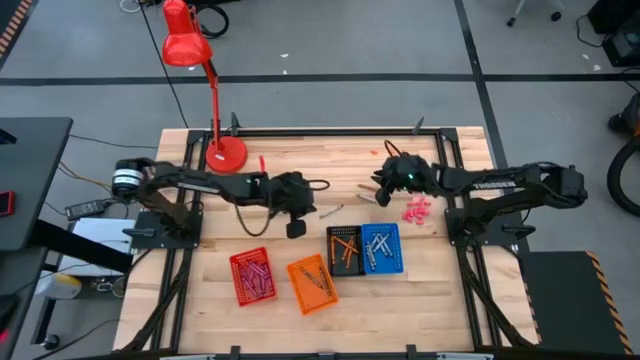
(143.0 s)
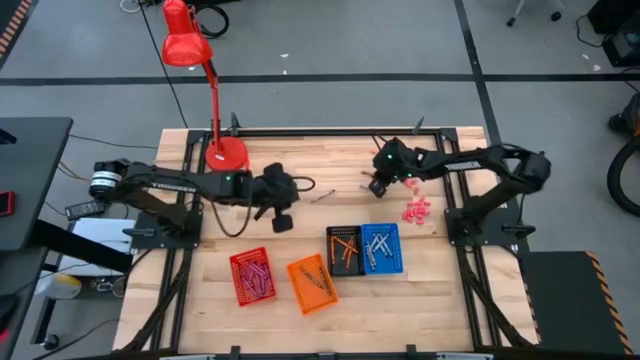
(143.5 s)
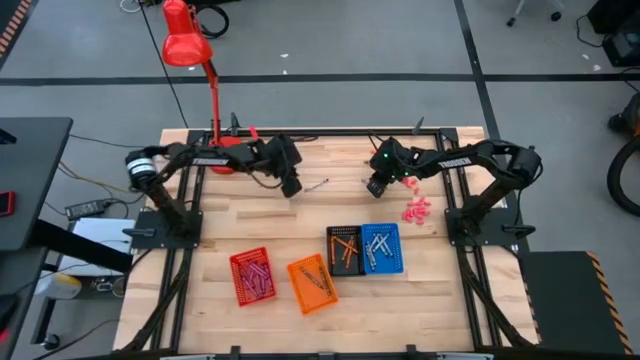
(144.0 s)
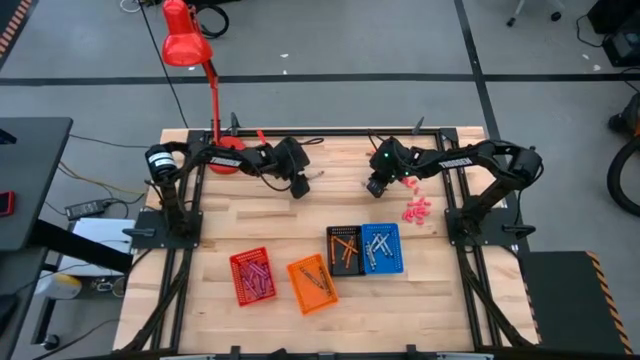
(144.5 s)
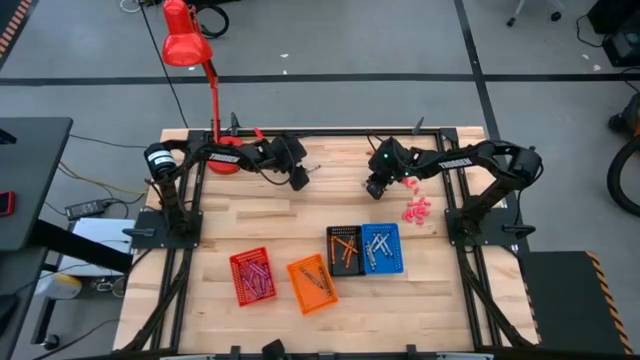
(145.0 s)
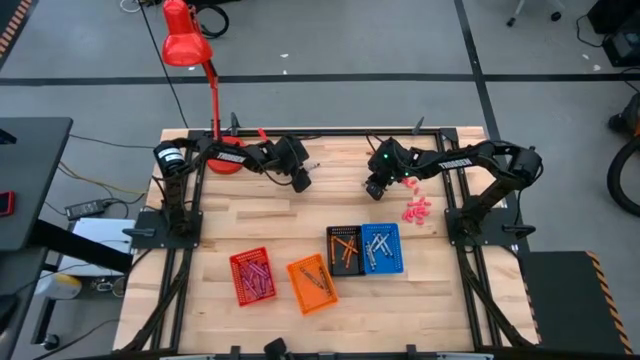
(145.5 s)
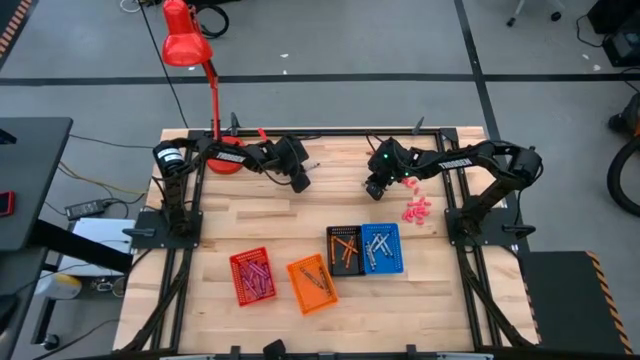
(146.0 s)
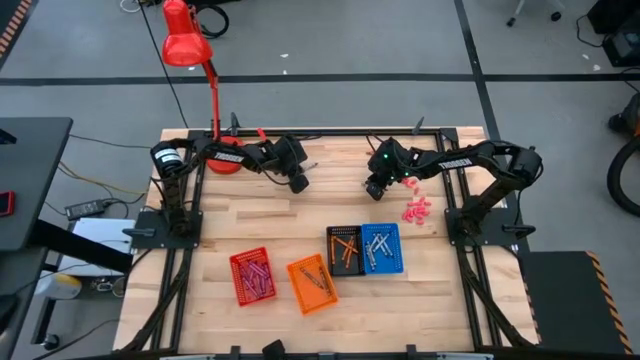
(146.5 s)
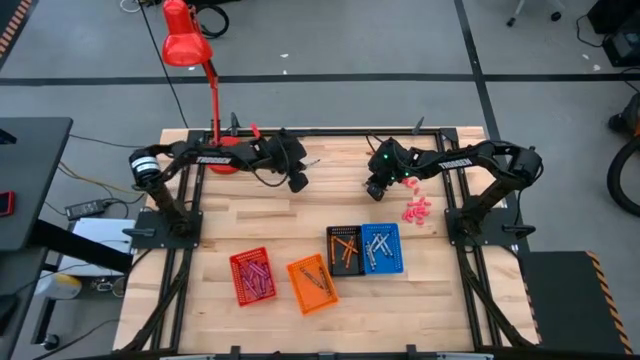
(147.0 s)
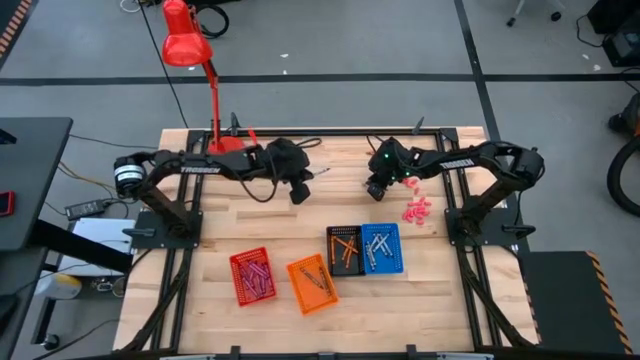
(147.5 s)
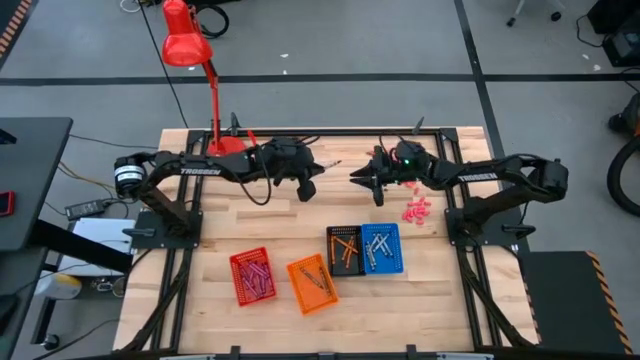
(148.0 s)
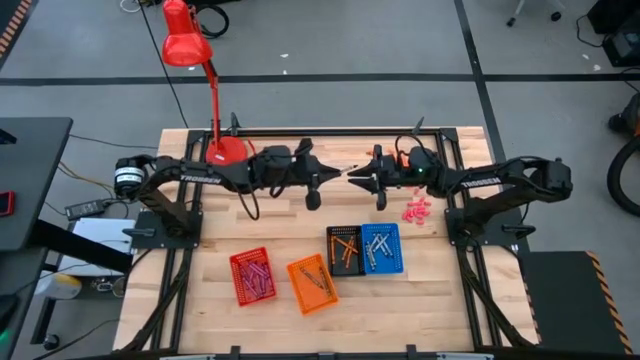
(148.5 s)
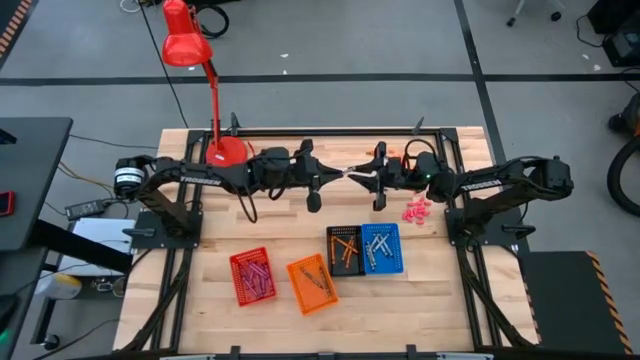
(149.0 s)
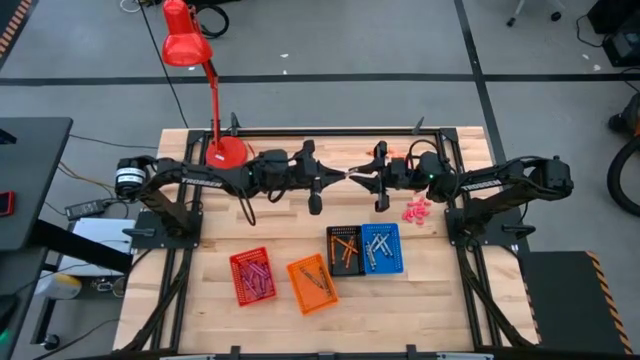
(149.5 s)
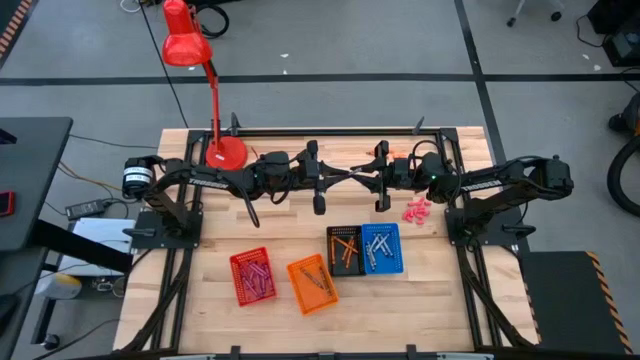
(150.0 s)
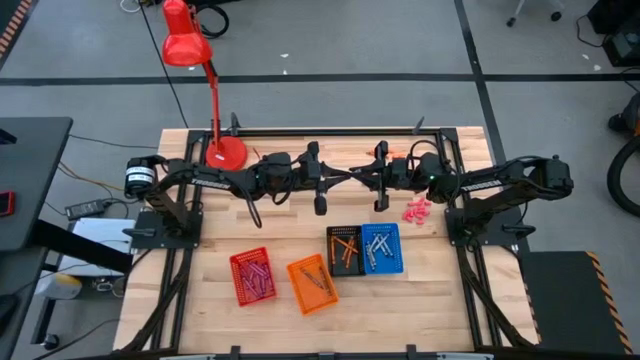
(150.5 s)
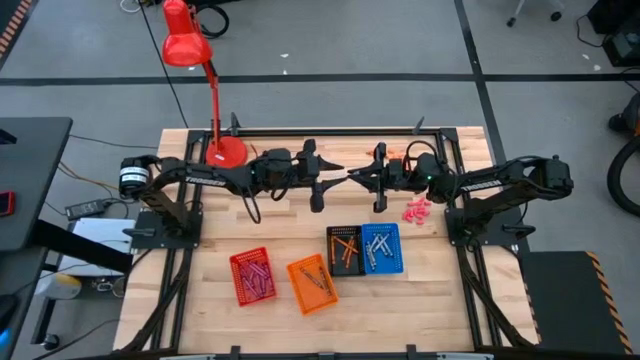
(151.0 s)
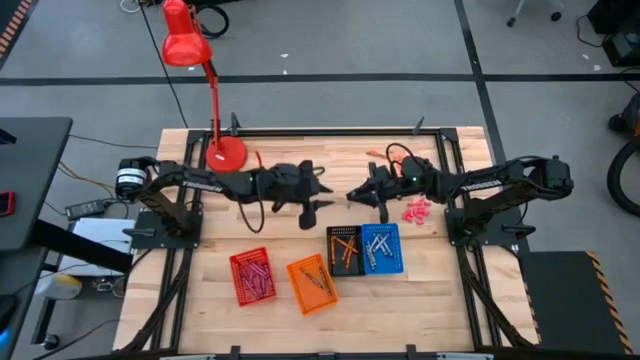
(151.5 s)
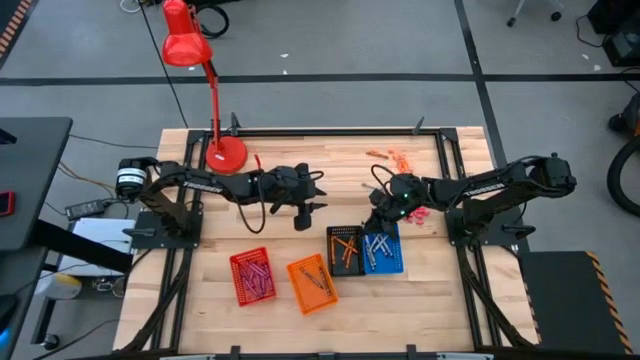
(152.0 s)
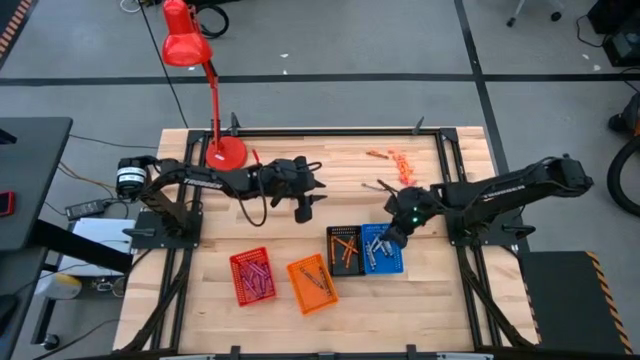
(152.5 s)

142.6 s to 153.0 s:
Task: Sort crayons
Put the black crayon into the blue bin

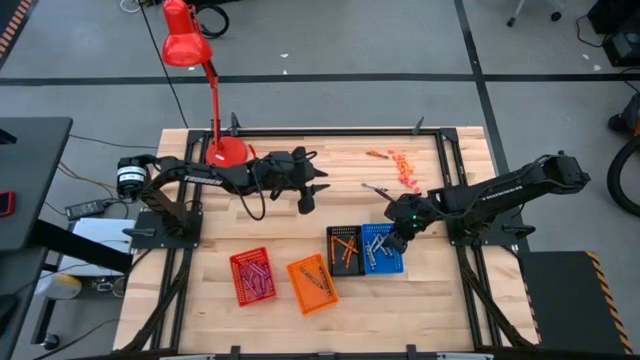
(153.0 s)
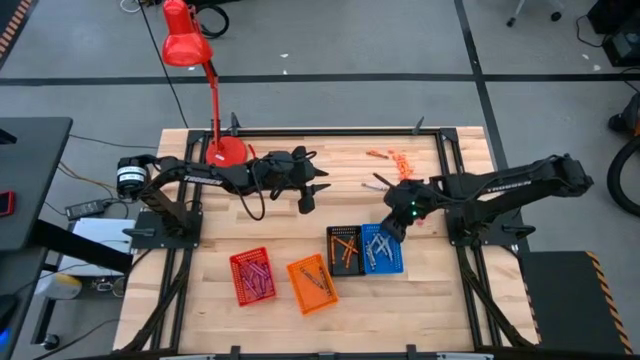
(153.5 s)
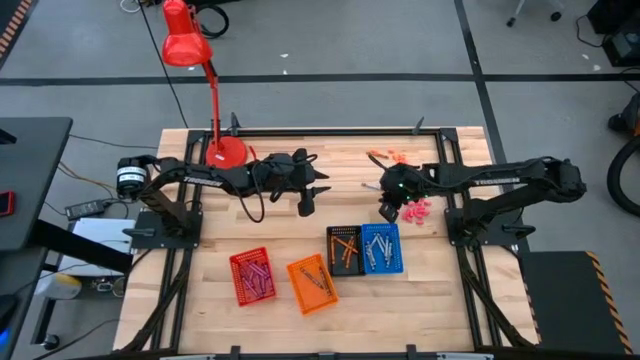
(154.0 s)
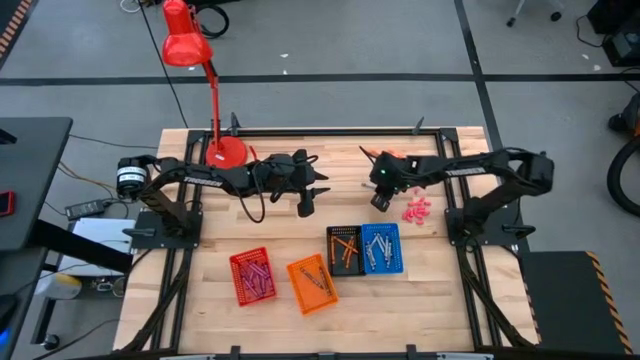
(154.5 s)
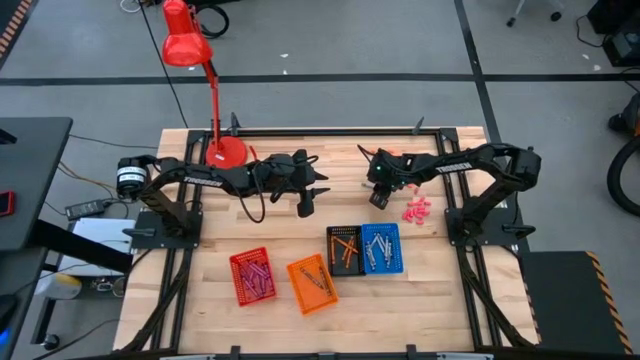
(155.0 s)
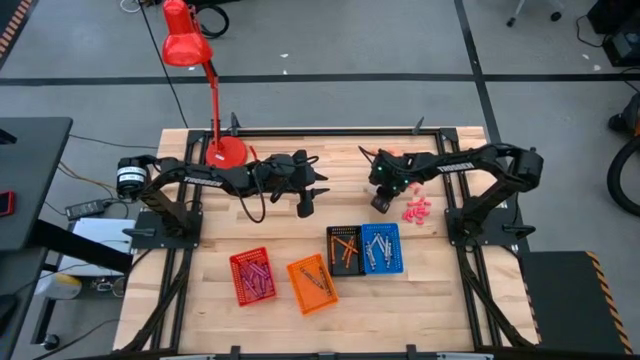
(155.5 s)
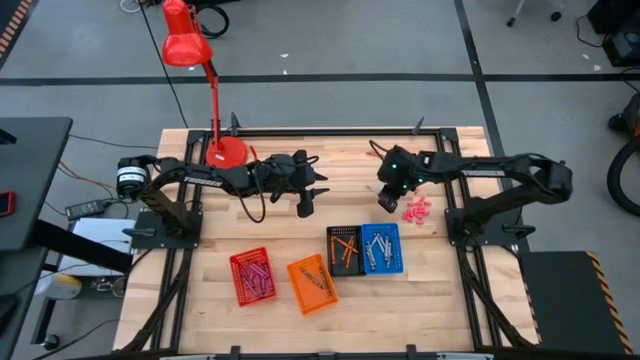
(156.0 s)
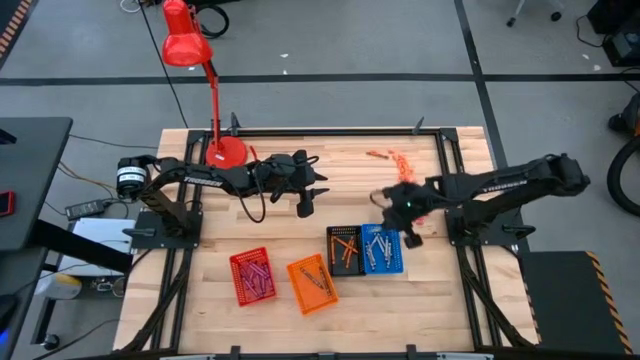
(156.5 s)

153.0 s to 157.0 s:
Put the black crayon into the blue bin

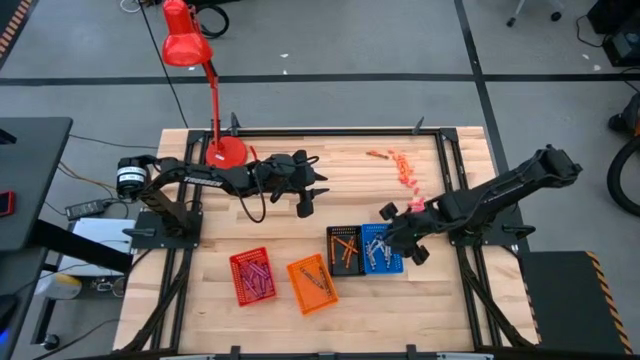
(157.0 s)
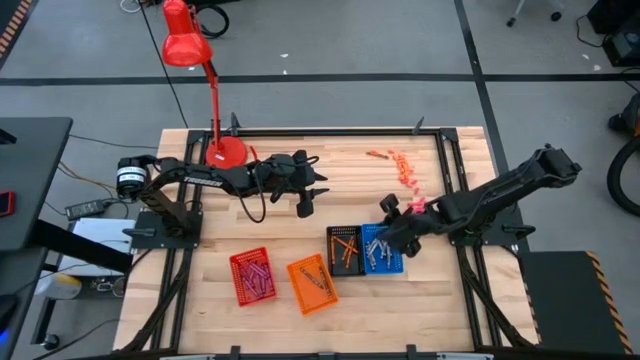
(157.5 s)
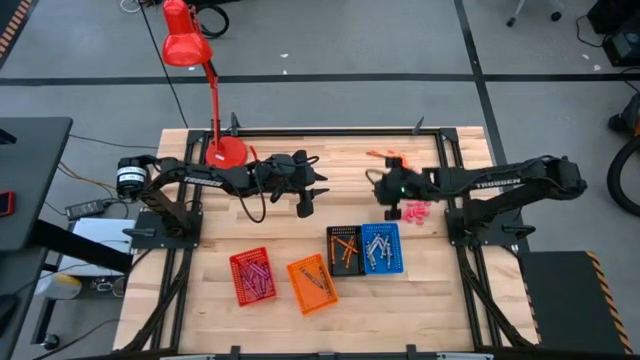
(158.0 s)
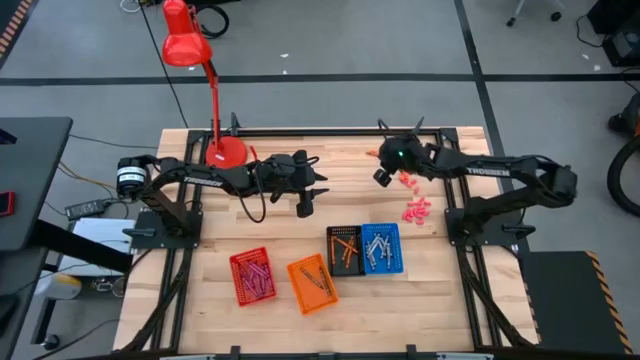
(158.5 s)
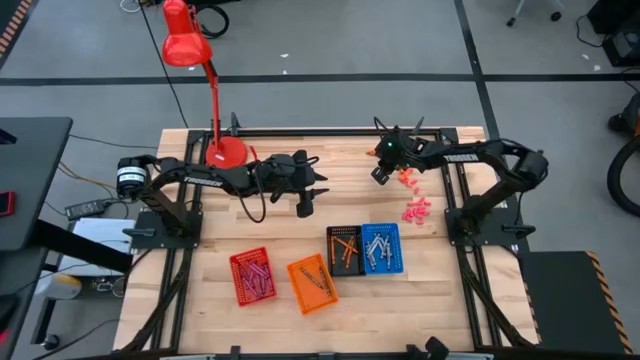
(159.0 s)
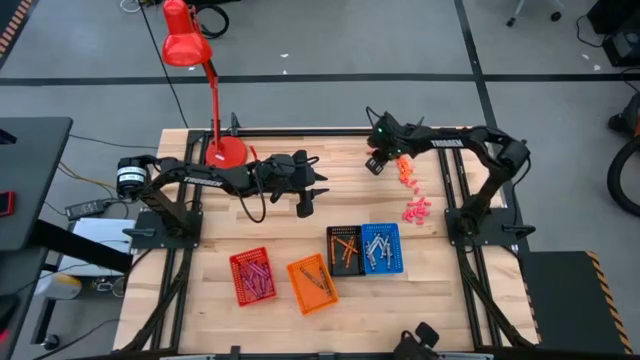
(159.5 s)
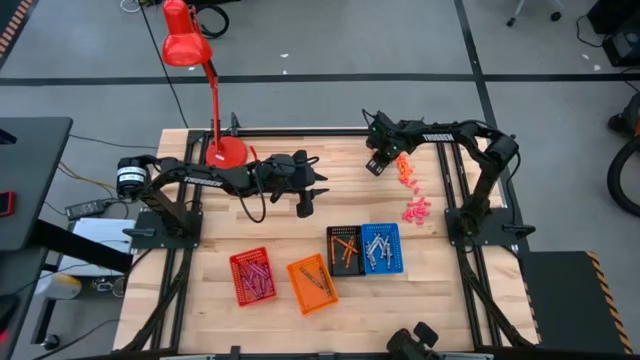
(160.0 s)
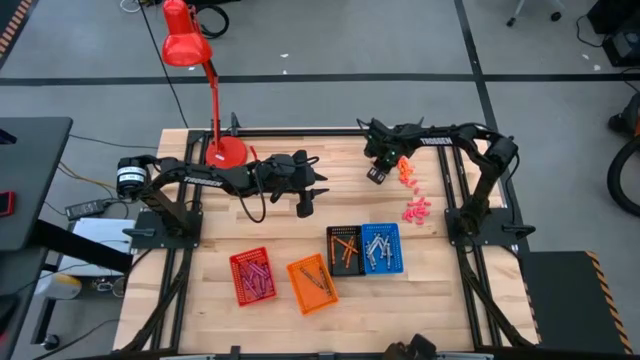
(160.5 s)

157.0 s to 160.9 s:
Put the orange crayon into the black bin

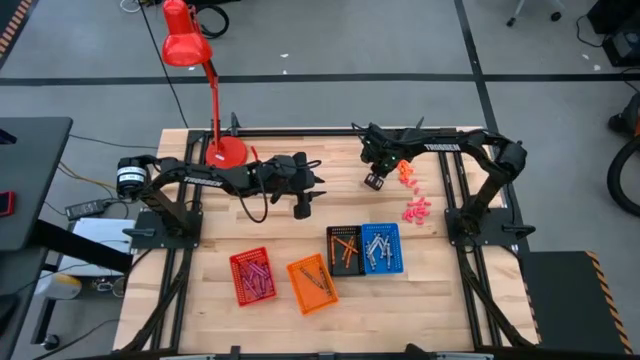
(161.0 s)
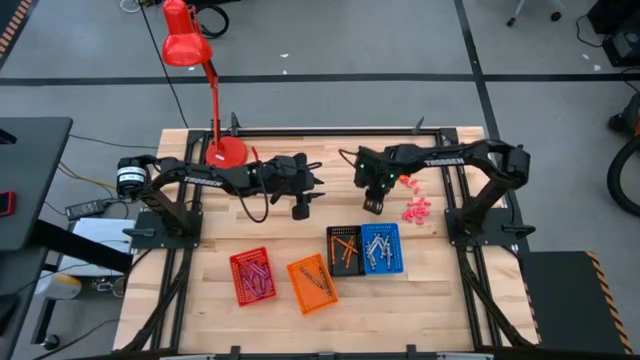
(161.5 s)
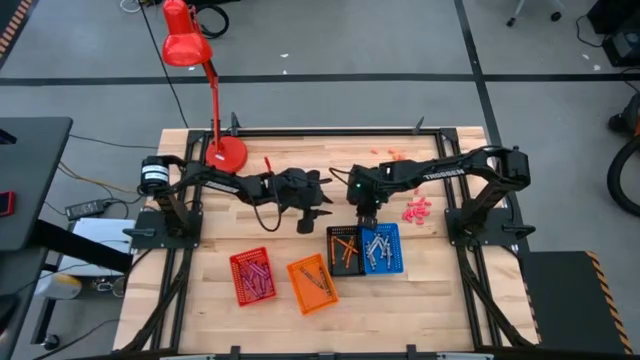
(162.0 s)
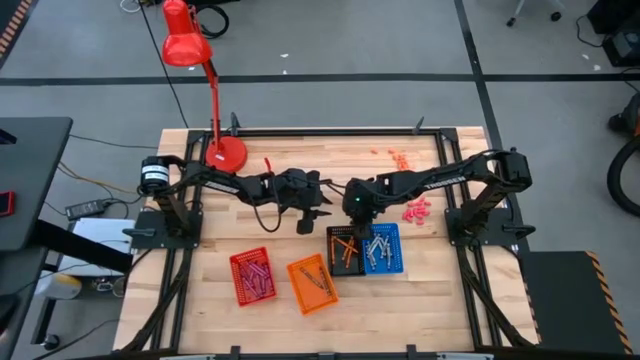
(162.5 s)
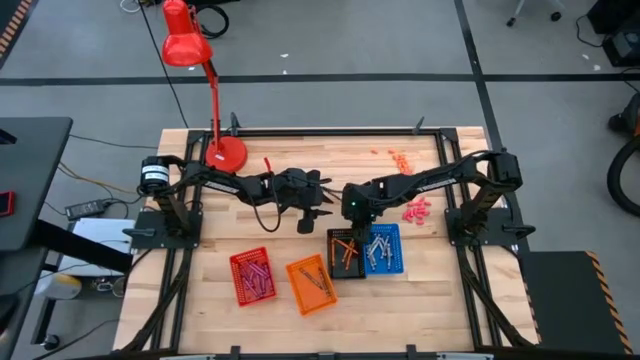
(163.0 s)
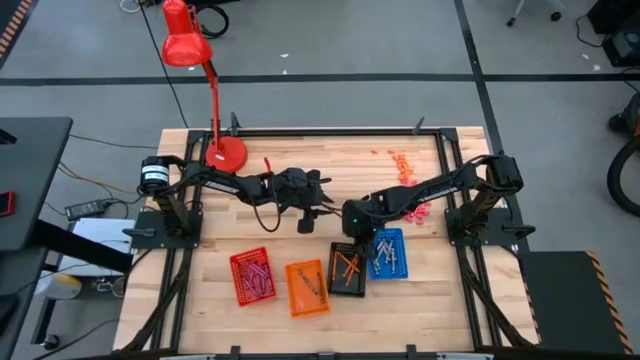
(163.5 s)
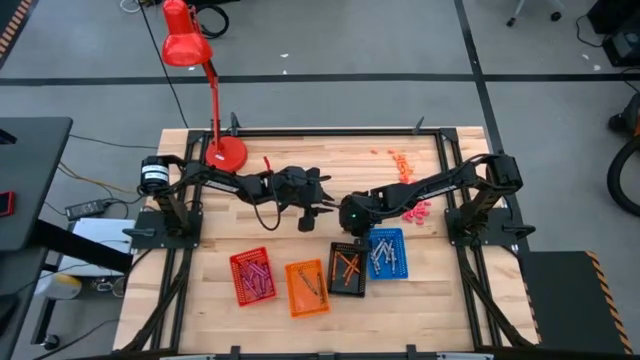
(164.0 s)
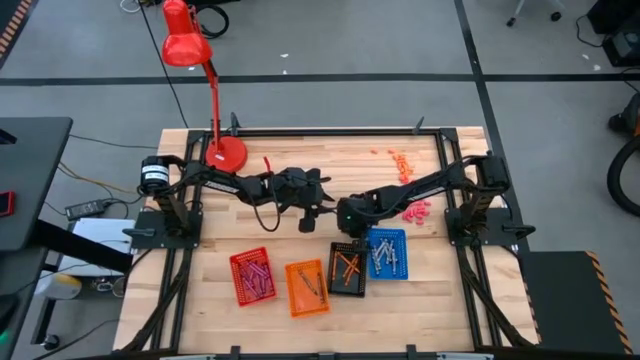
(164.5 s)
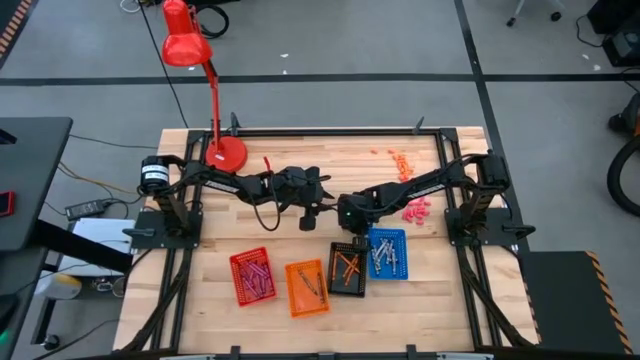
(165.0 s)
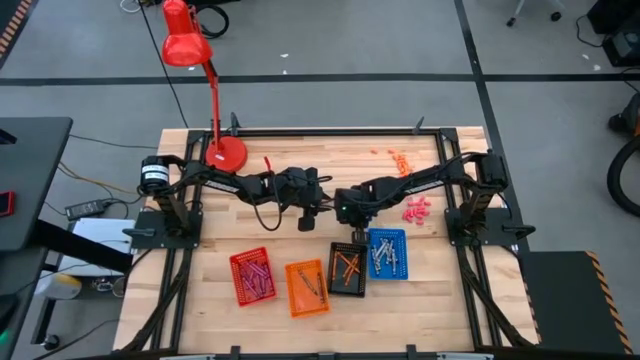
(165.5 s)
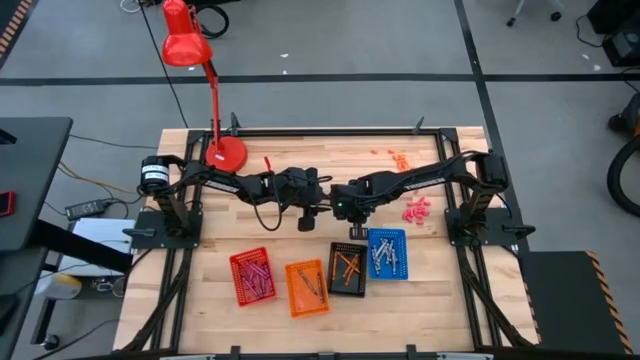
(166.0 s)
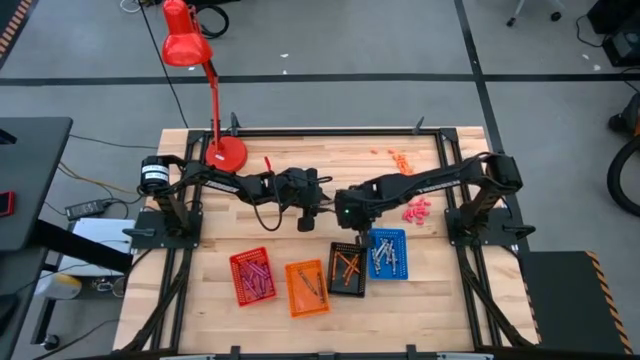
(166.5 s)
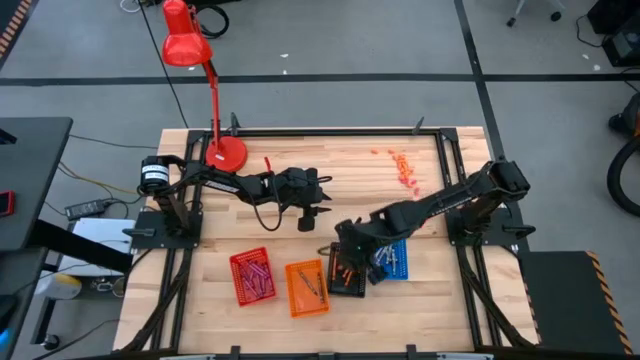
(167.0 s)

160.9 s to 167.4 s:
Put the orange crayon into the black bin
